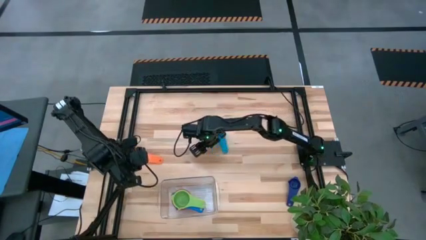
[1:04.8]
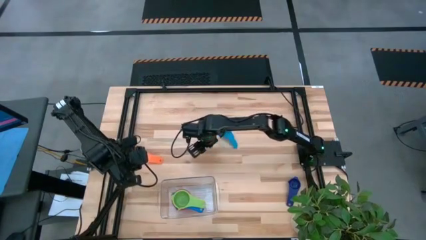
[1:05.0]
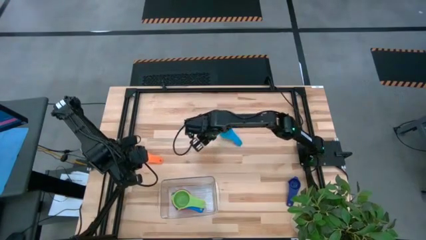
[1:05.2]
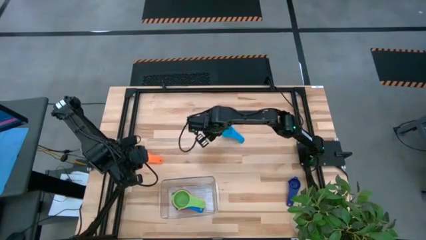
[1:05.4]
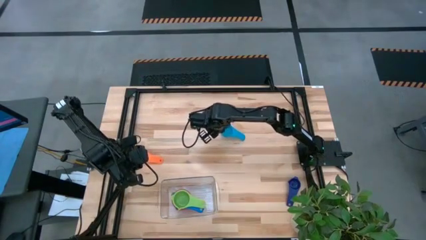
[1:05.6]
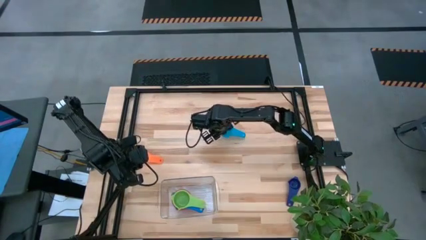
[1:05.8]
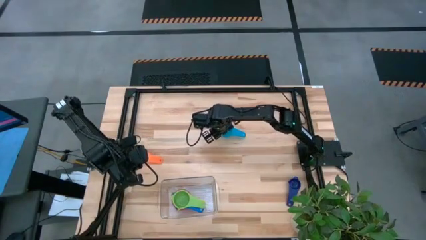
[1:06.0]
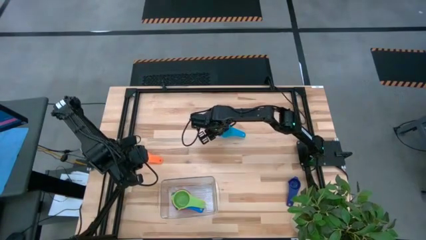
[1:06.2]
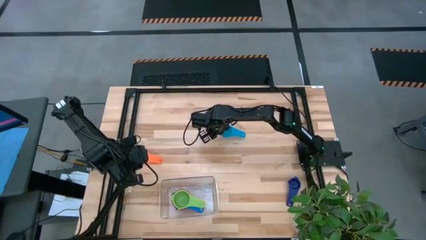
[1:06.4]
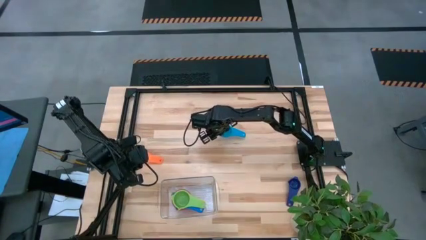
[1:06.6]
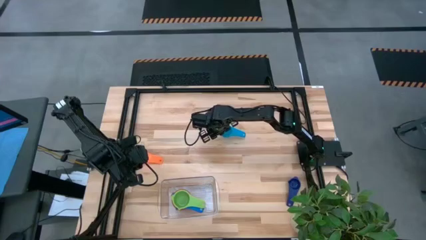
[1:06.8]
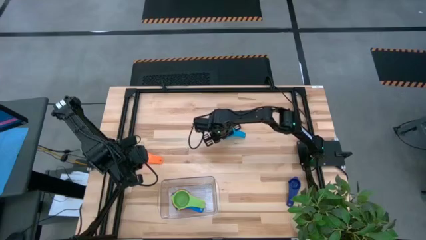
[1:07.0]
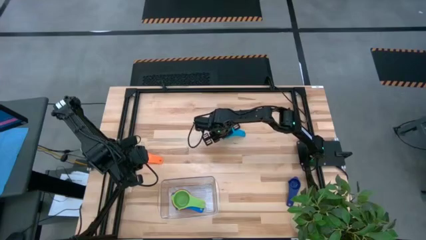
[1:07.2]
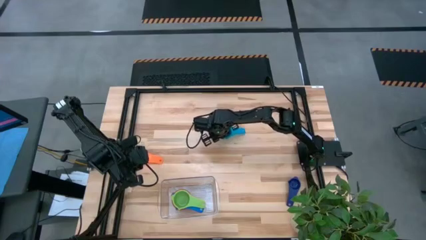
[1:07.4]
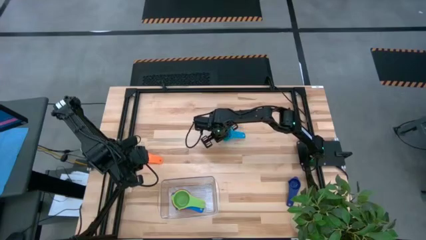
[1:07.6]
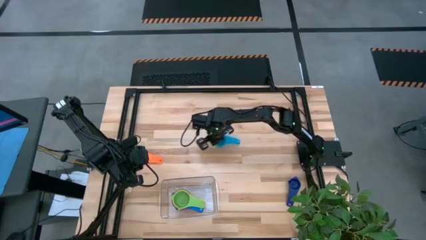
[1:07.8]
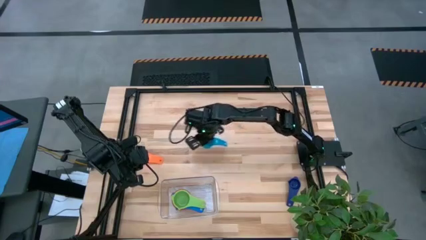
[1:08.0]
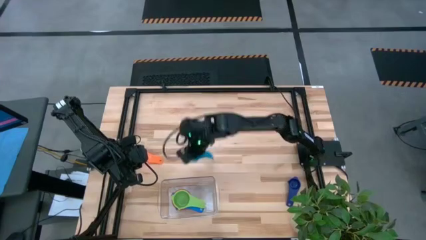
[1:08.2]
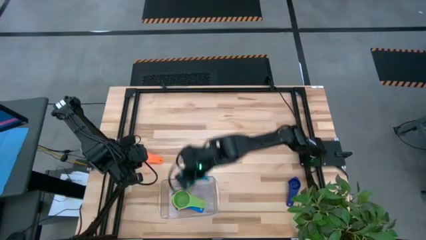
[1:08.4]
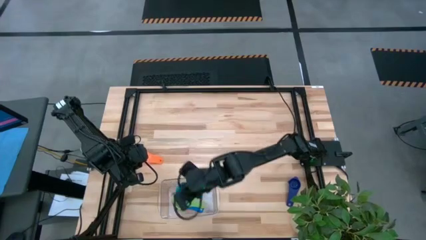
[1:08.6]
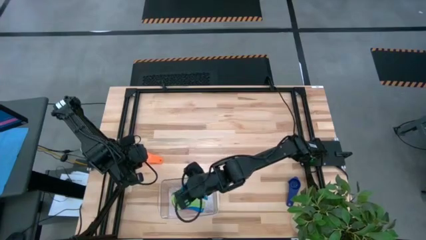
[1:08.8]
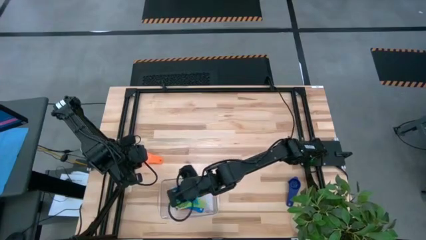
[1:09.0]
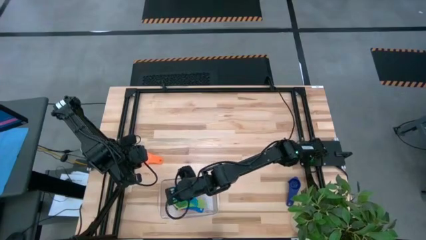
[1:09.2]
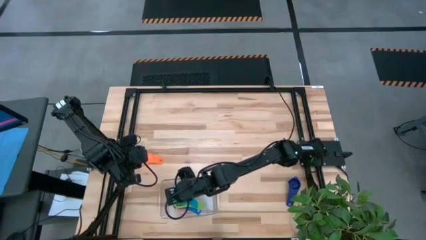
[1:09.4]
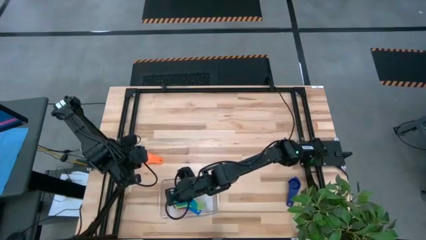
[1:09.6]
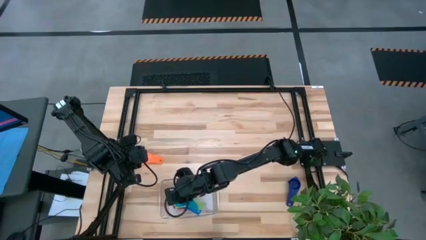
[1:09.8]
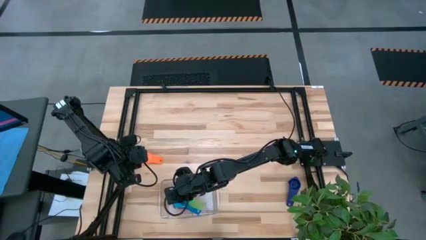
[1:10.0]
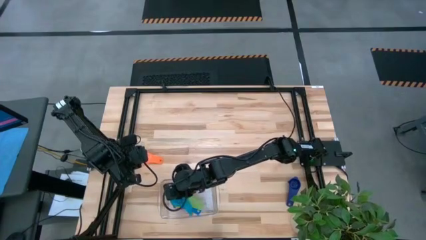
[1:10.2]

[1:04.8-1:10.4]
Task: Nest measuring cups in basket
Stack the light blue measuring cup on top of the green measuring cup into the transparent bin

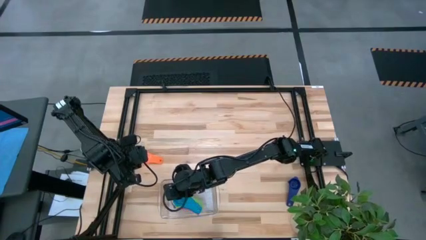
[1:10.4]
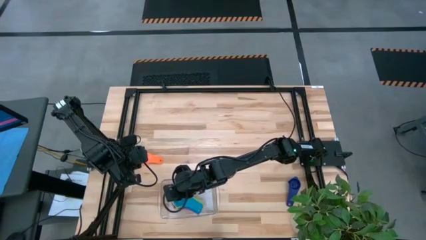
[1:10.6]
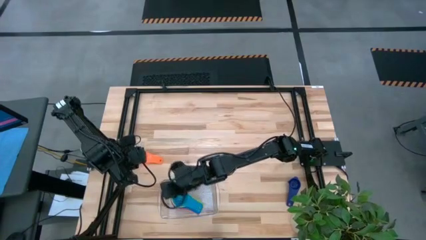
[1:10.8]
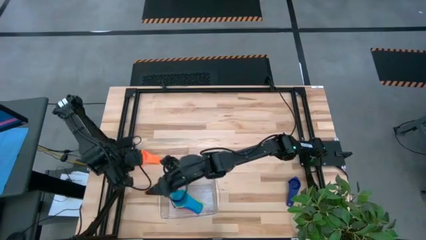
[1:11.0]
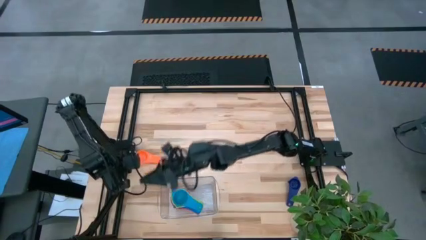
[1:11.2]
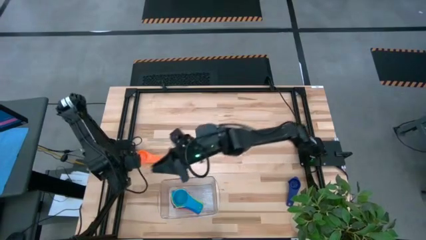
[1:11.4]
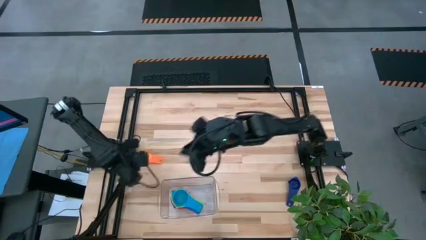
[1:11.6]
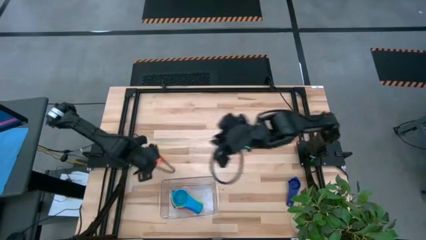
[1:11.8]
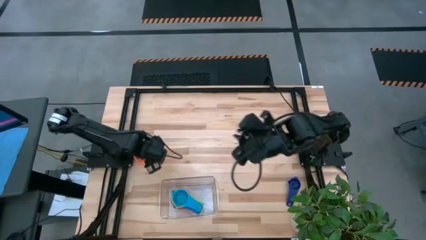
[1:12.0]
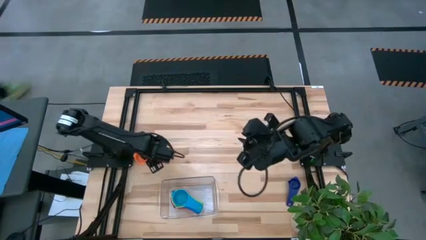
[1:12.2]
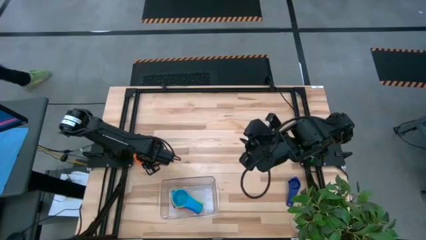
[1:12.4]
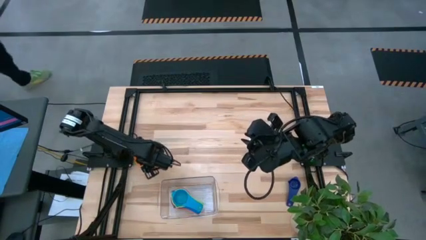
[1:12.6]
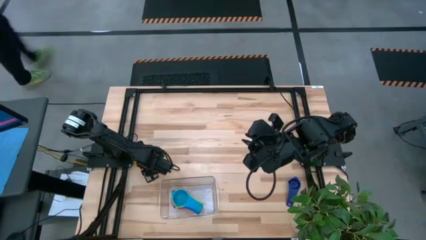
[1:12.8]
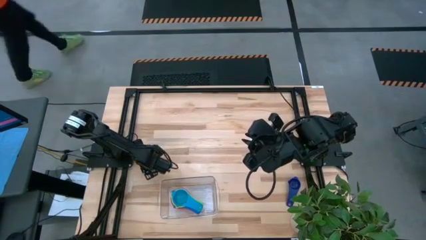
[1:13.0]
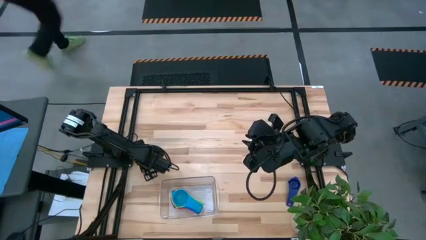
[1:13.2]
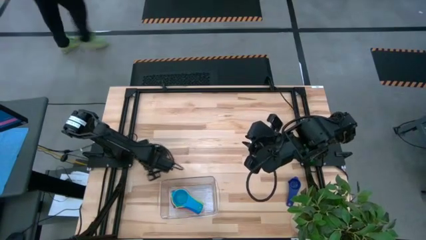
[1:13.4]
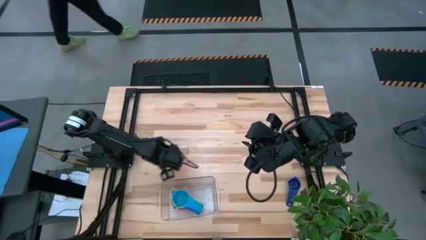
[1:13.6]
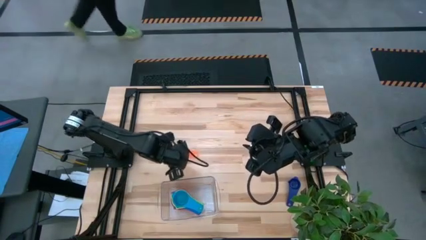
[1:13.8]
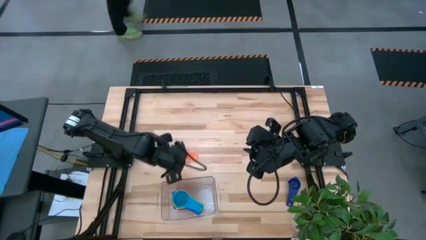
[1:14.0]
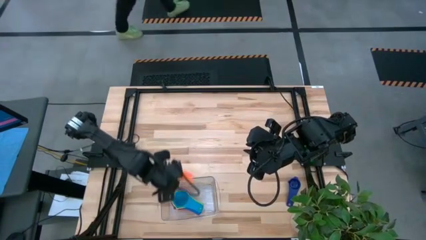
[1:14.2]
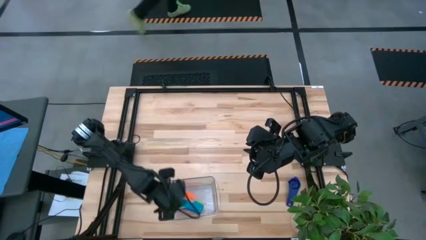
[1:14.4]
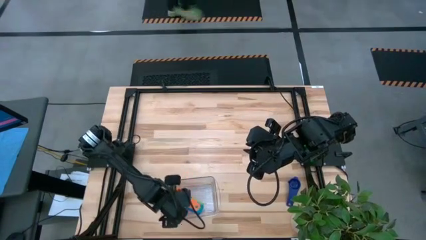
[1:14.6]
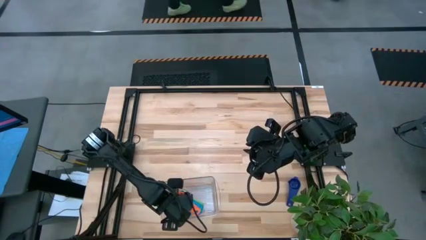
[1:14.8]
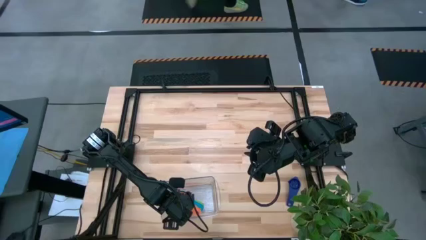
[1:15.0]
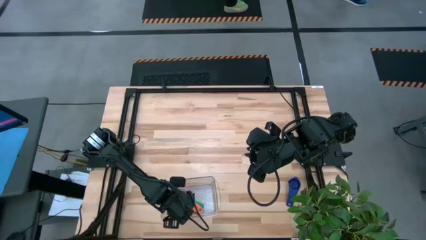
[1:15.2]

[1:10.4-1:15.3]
Stack the orange measuring cup on top of the light blue measuring cup into the transparent bin

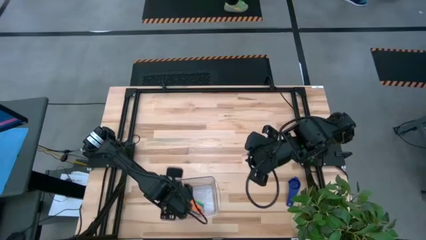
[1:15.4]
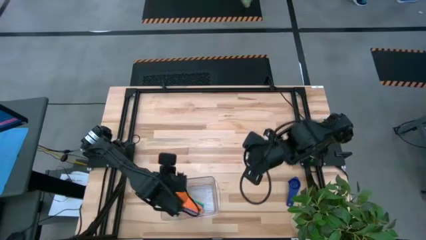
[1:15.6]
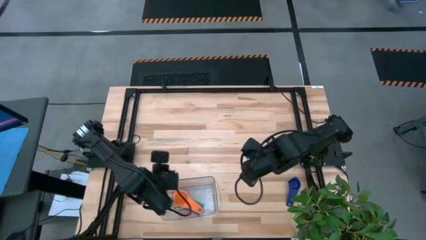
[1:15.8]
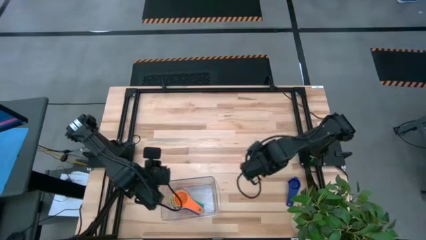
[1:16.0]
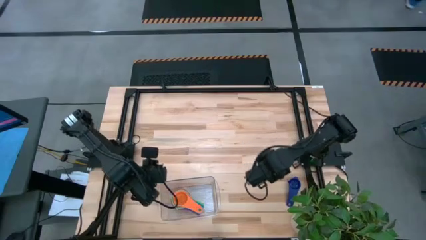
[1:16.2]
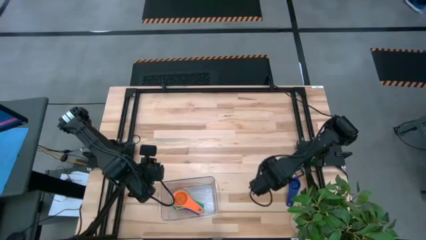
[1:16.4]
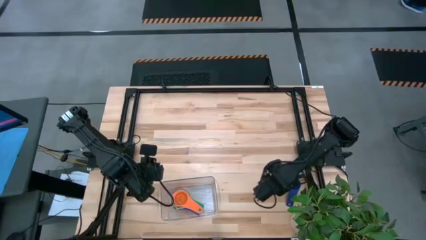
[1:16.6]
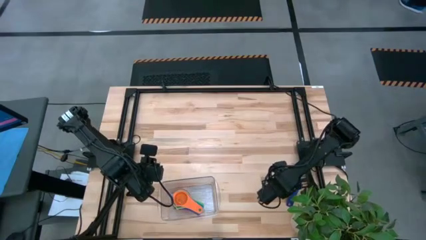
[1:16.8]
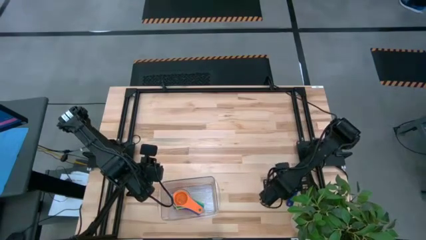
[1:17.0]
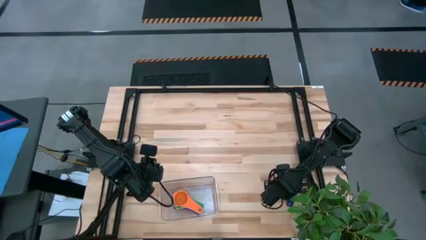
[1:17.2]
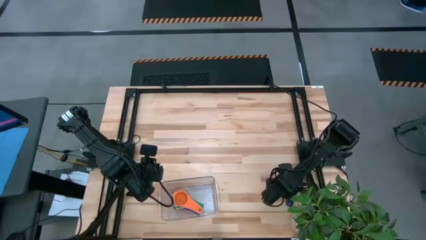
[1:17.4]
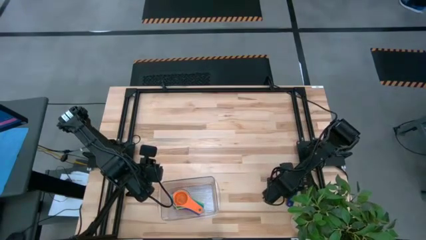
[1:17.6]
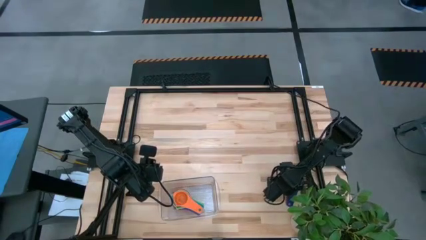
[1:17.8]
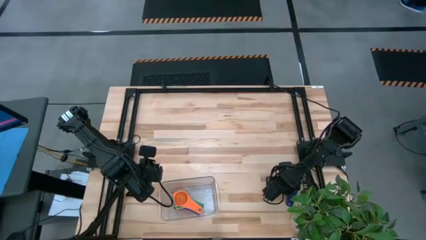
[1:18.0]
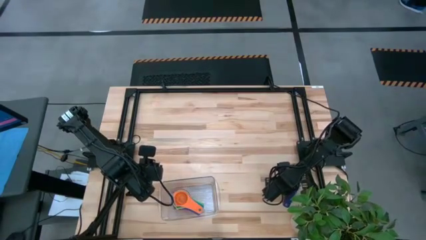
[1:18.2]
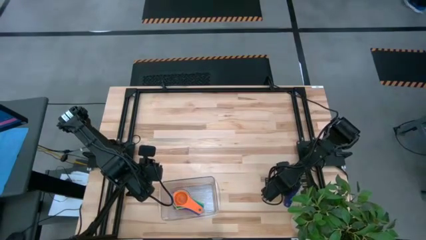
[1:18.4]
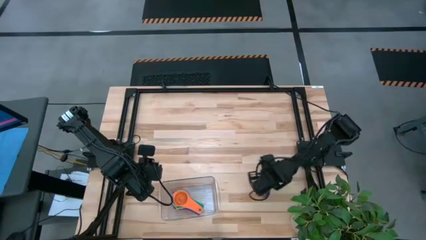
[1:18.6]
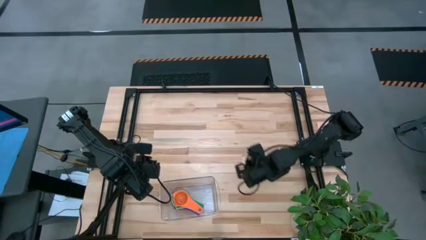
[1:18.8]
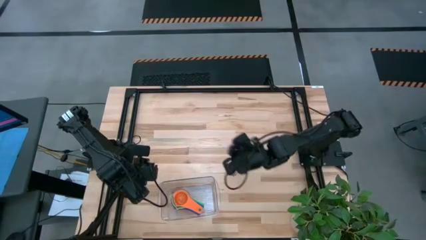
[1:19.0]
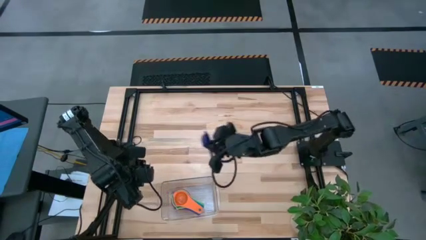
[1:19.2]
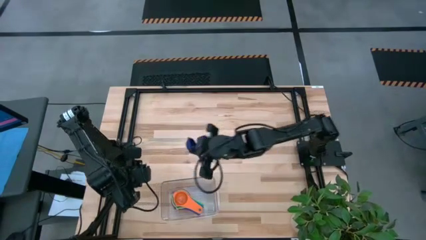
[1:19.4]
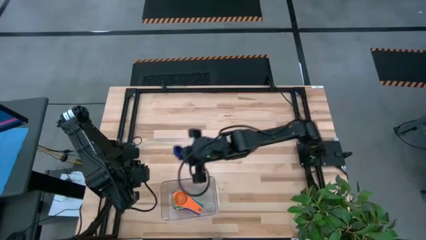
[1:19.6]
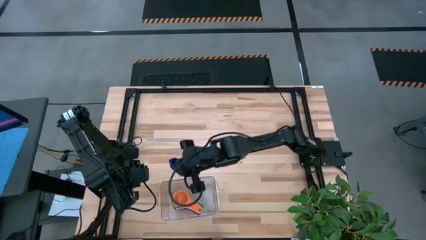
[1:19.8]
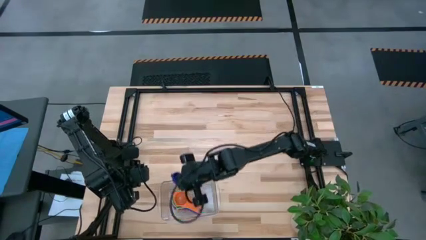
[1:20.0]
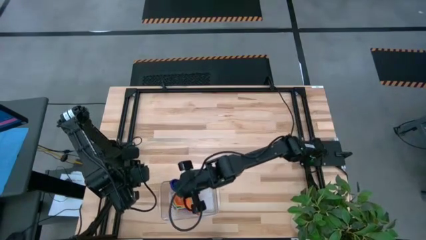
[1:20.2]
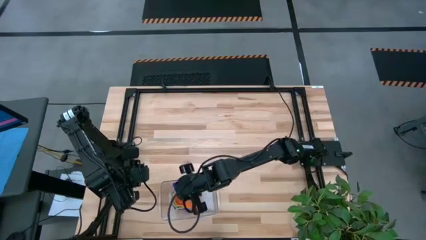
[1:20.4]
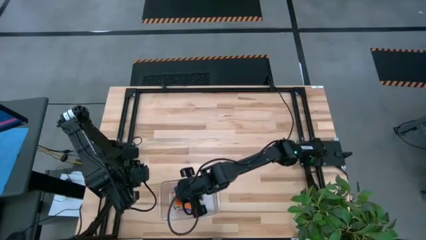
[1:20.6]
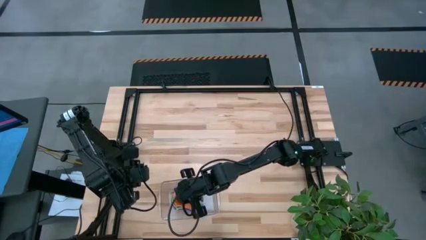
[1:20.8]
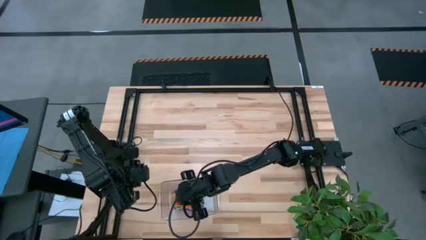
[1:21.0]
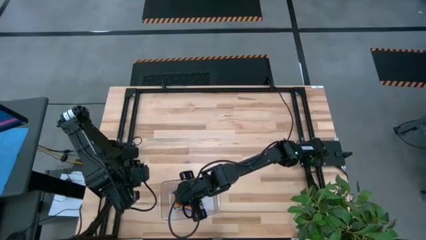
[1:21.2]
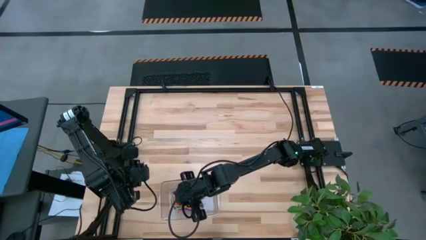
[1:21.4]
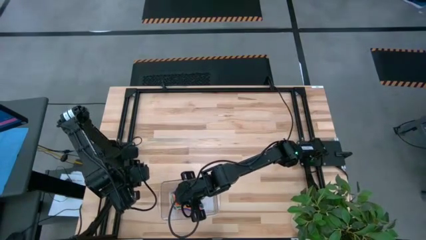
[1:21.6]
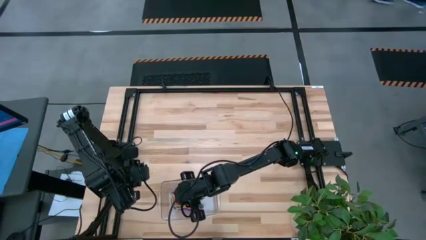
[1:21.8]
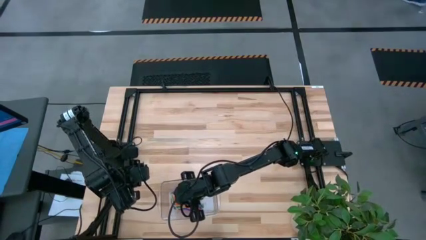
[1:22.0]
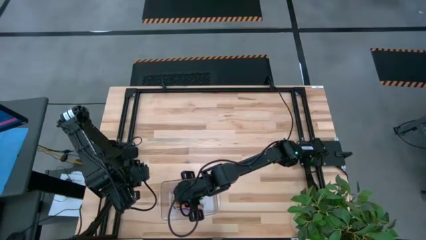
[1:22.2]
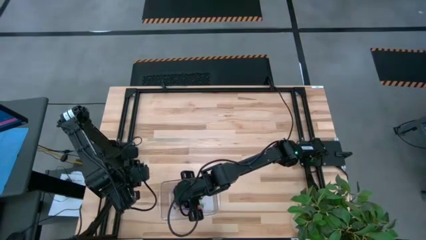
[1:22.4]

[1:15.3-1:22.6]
Stack the dark blue measuring cup on top of the orange measuring cup into the transparent bin
